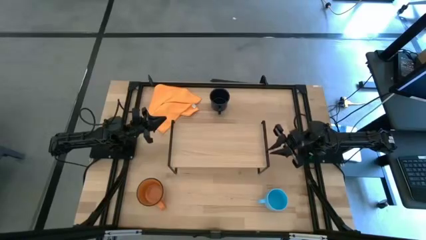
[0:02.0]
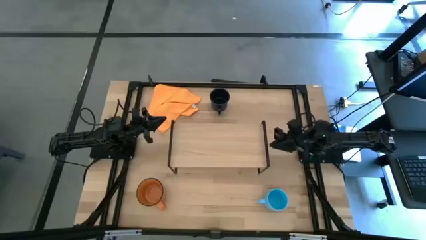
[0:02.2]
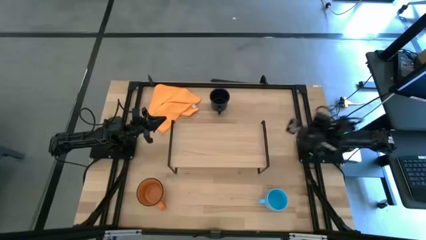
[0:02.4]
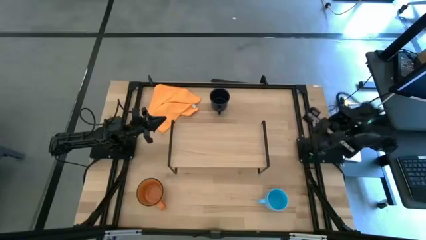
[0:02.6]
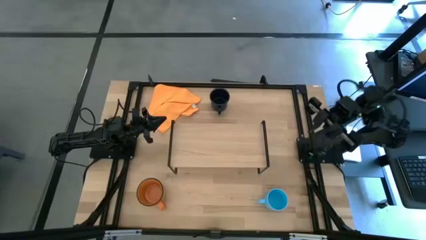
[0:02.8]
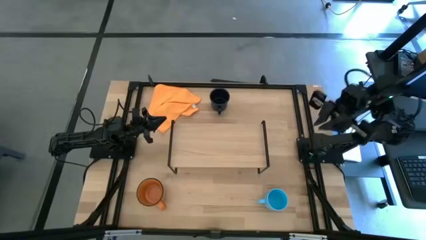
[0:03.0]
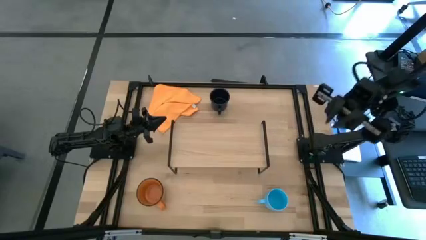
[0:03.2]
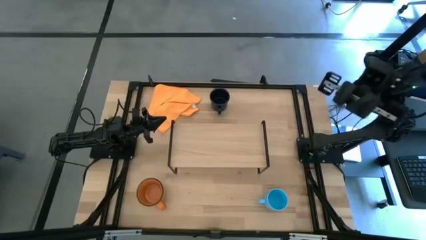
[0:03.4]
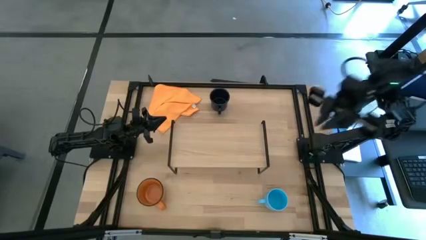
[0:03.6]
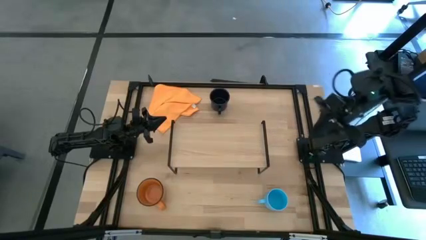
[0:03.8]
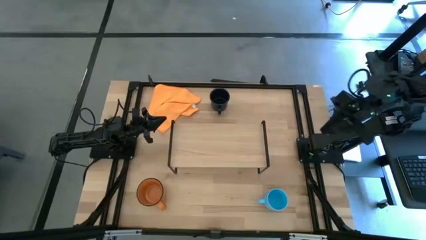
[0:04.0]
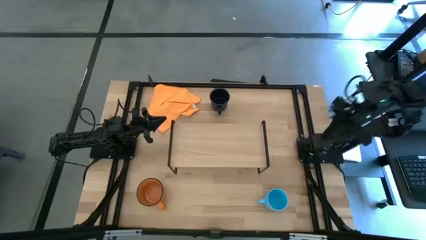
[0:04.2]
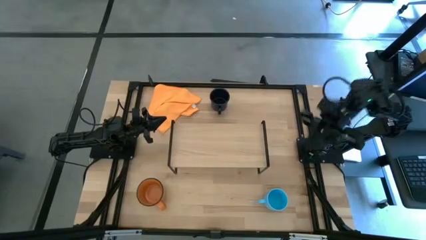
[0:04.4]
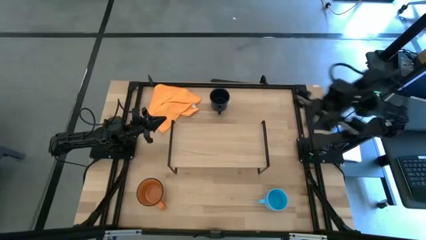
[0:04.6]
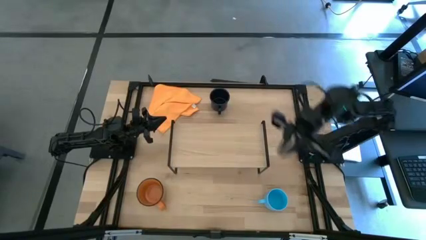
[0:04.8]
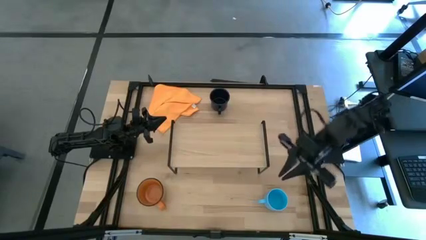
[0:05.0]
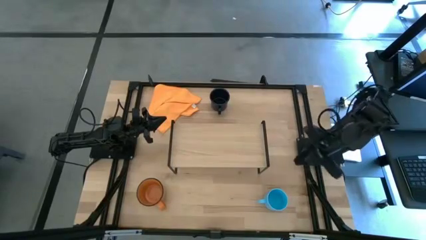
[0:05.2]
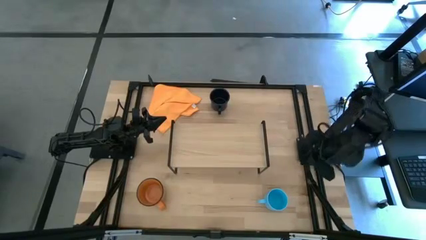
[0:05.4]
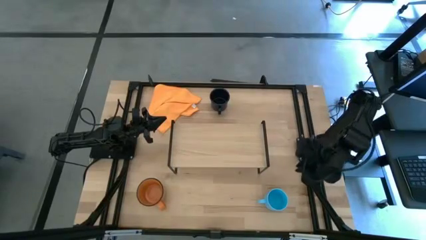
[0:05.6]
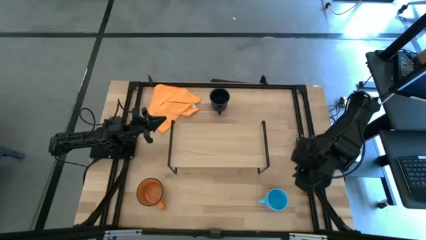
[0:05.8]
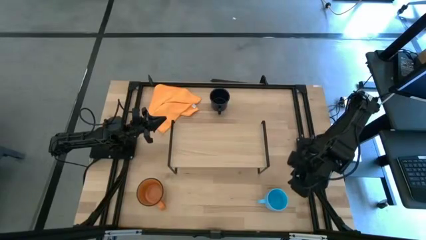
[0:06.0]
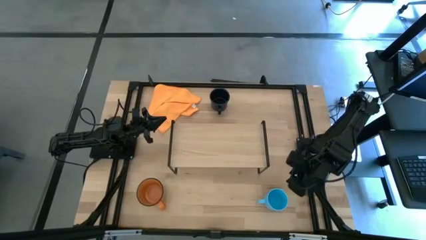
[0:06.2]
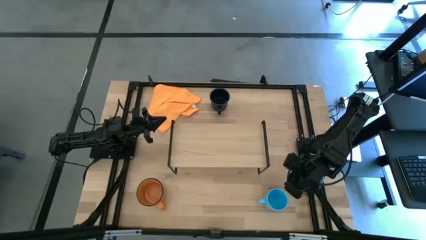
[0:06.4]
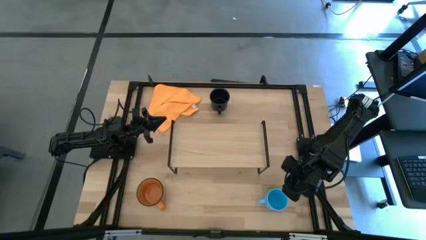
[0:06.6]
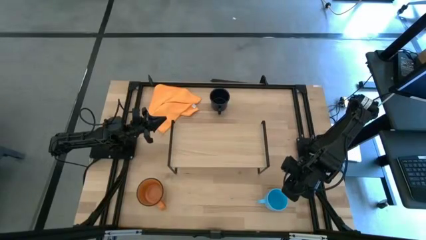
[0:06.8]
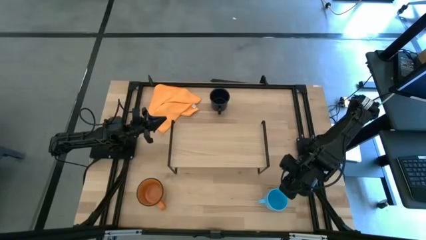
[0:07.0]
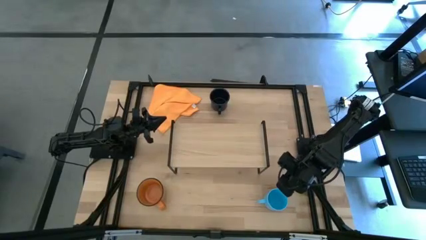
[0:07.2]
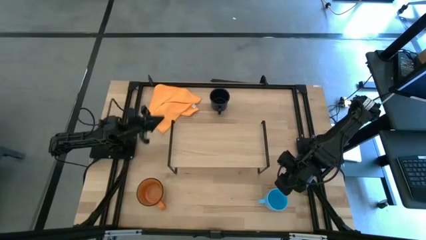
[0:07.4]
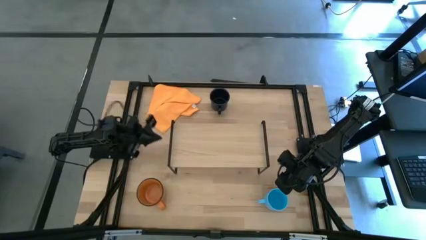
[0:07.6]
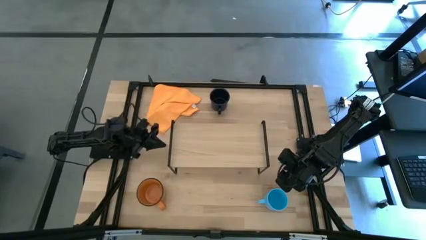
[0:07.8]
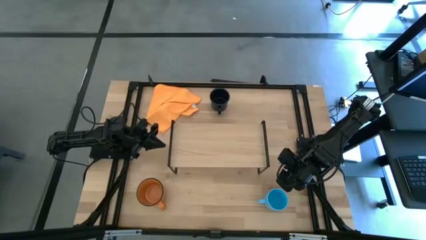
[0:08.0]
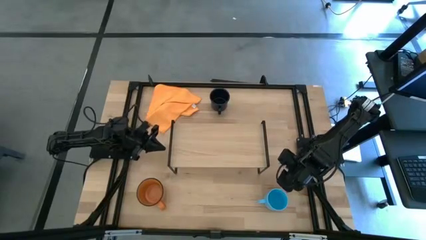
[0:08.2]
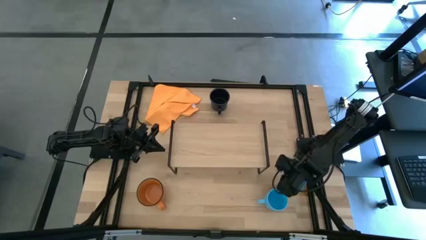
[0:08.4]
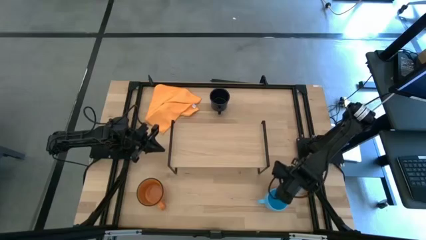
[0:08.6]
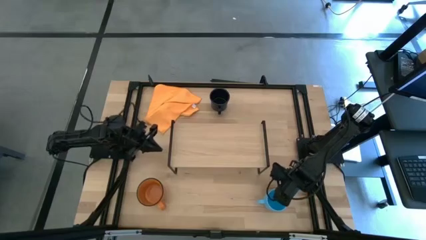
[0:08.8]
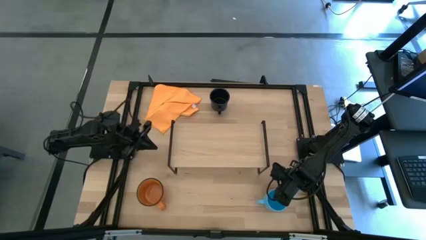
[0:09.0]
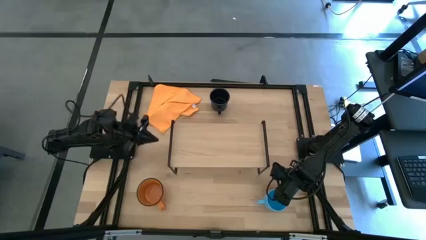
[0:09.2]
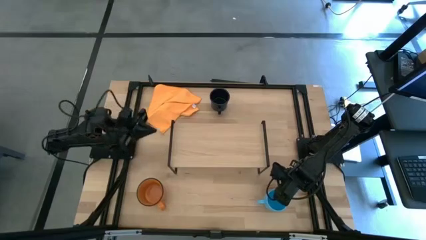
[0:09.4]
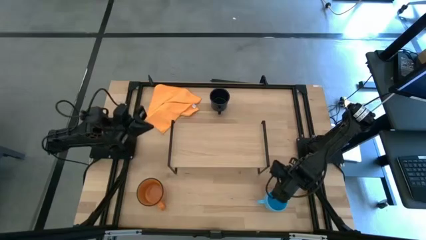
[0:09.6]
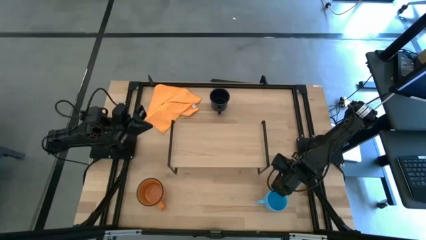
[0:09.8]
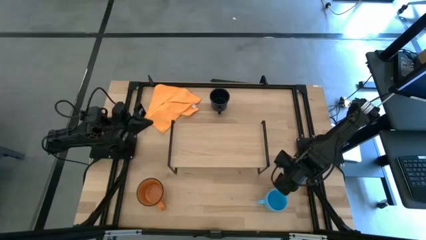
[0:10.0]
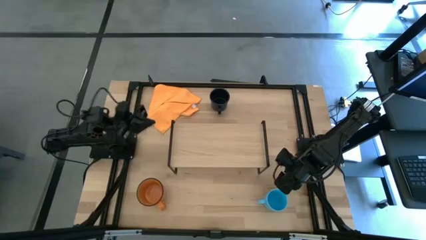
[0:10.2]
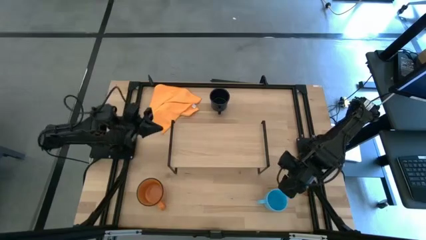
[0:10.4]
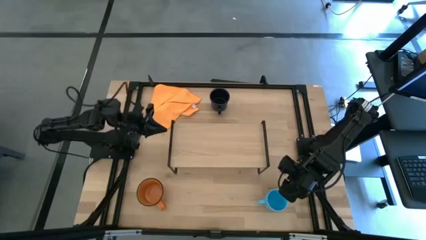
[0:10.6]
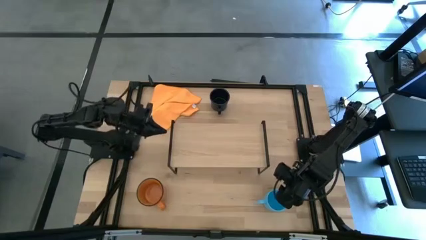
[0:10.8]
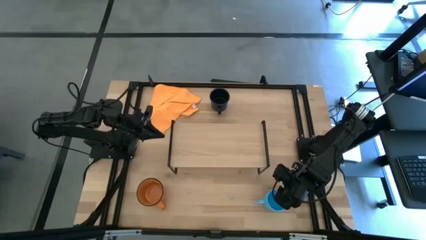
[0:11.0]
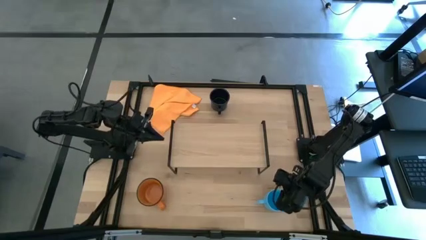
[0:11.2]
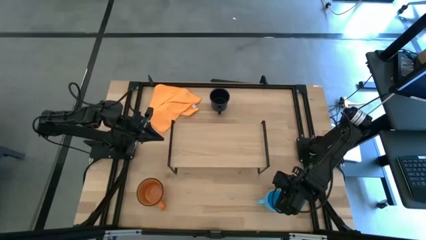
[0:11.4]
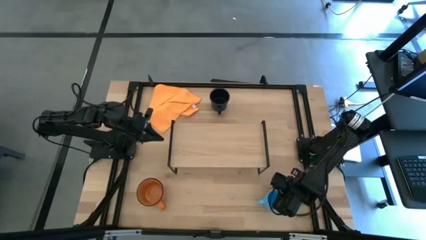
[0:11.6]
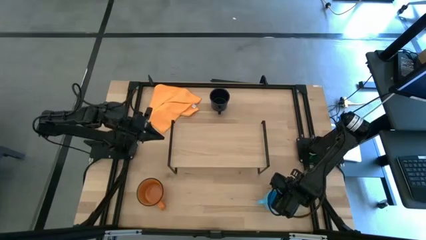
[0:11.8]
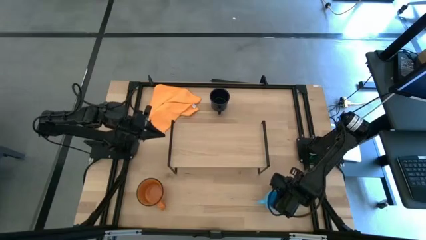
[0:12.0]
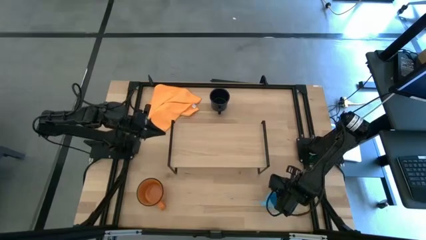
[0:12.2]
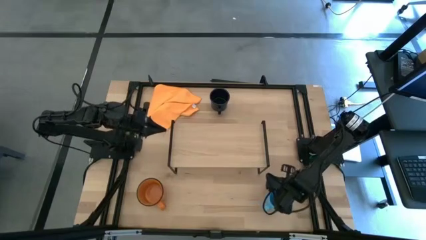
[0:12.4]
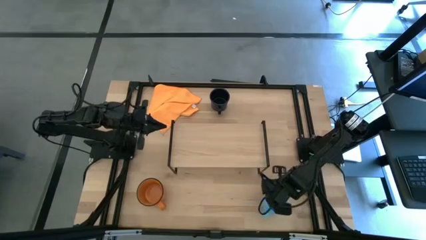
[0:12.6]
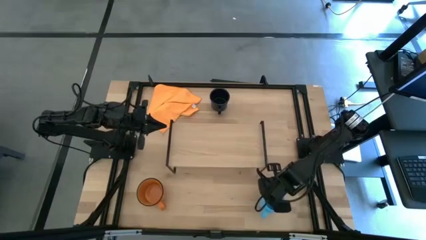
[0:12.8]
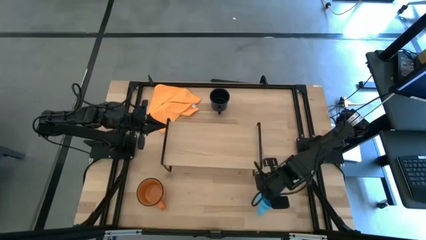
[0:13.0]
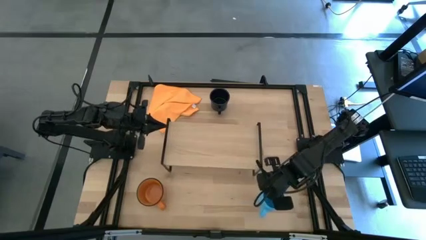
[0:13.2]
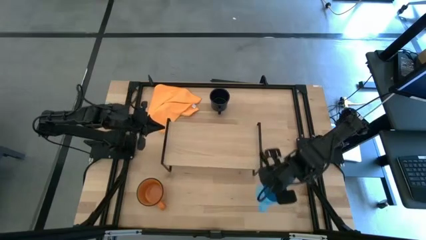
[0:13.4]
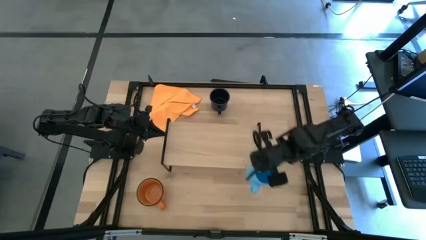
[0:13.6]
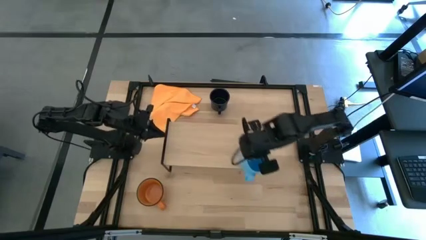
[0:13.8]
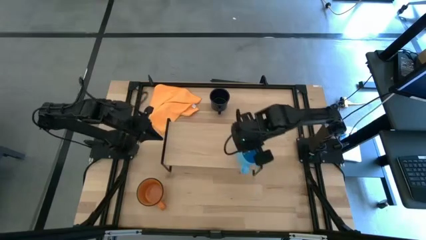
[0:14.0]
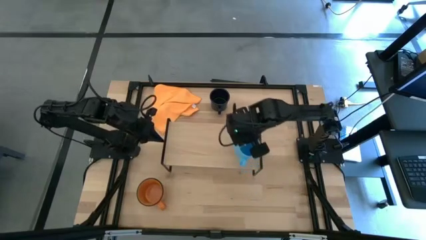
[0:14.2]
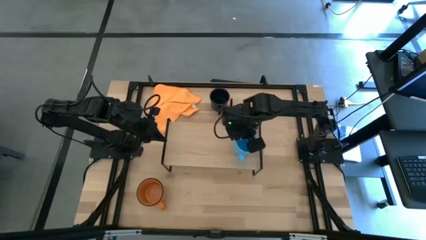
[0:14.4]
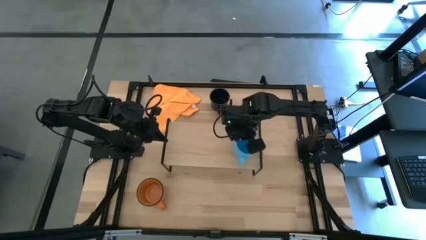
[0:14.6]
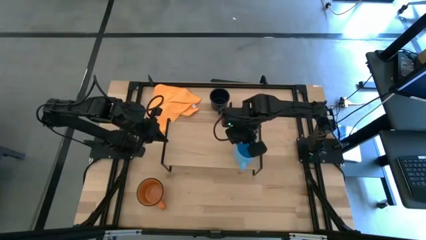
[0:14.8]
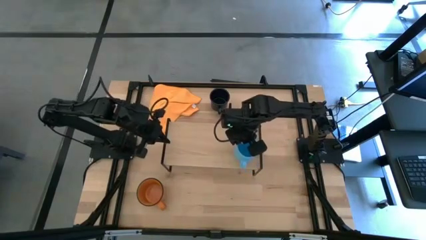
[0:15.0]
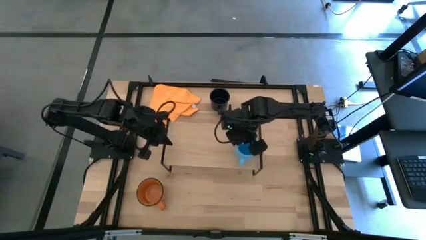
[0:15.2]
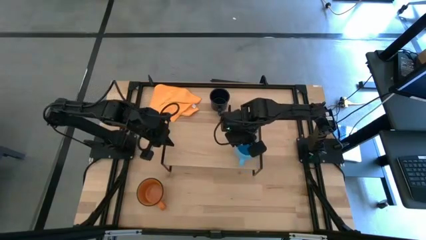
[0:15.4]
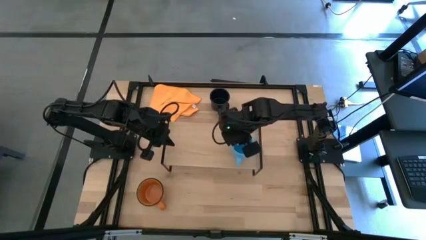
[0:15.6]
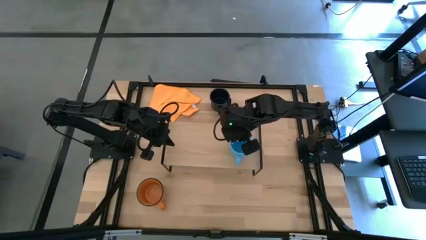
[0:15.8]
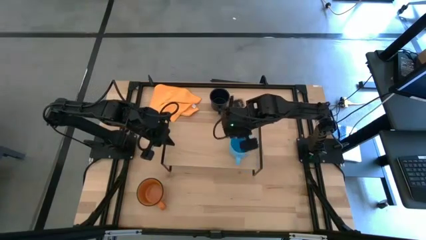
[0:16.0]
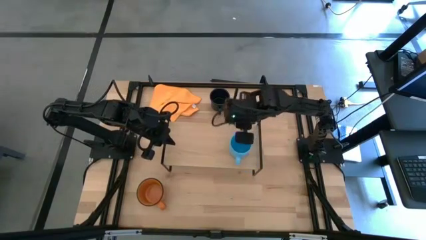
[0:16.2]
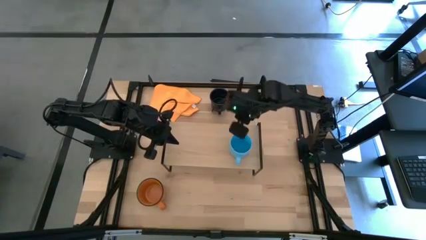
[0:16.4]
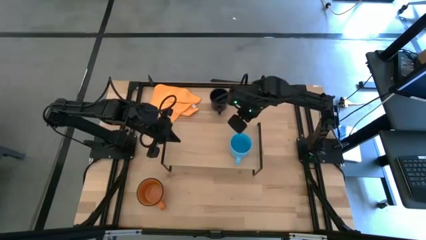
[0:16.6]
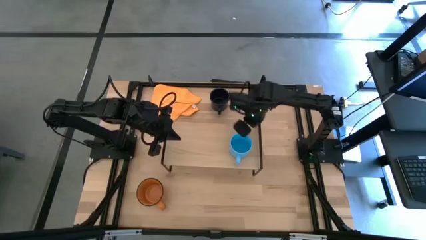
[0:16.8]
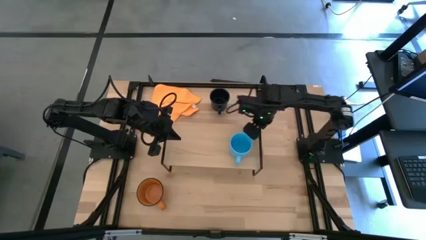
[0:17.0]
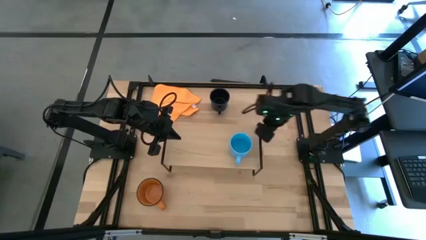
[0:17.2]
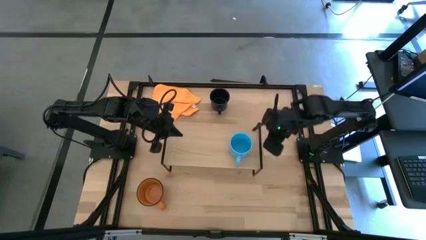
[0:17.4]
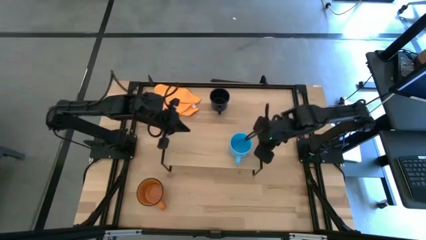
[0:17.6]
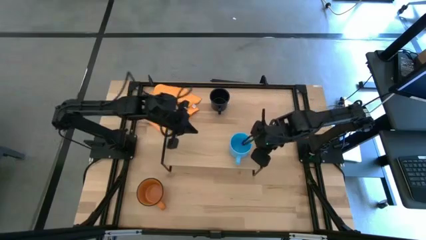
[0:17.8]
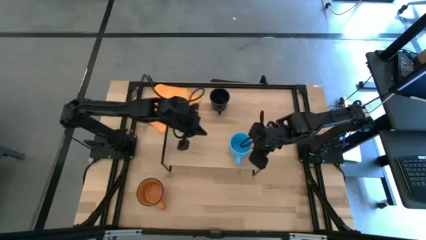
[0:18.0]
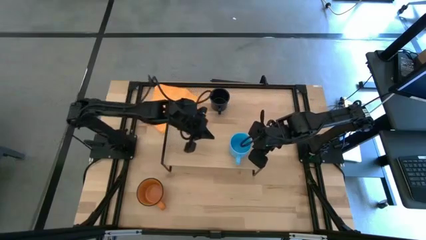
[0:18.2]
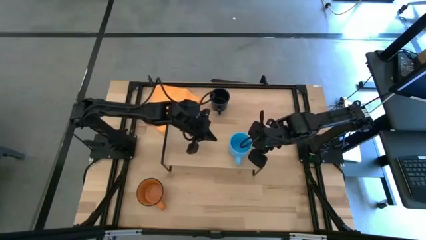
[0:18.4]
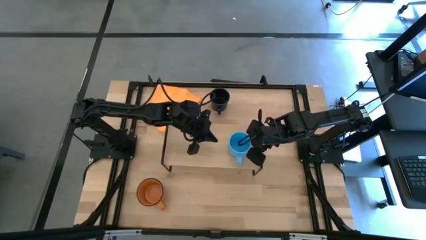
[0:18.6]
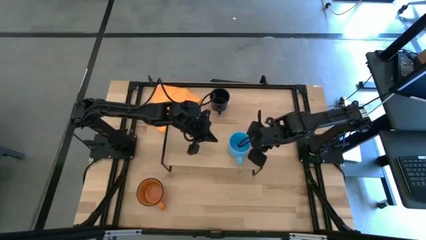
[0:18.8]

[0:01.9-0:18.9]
Task: Stack small to large cups/mugs on shelf
Put the blue cup on the shelf
